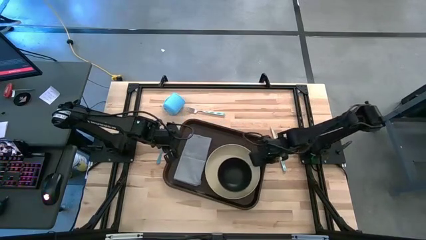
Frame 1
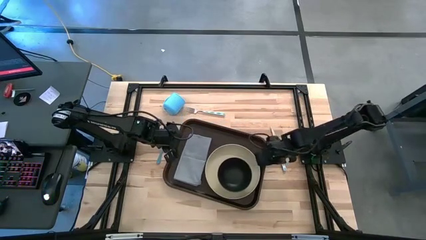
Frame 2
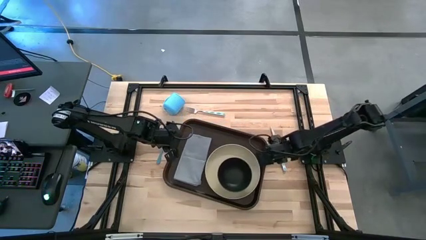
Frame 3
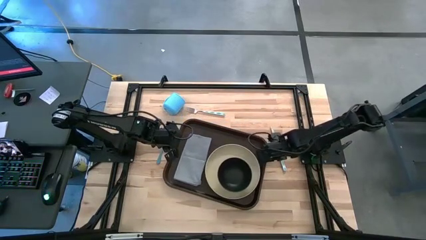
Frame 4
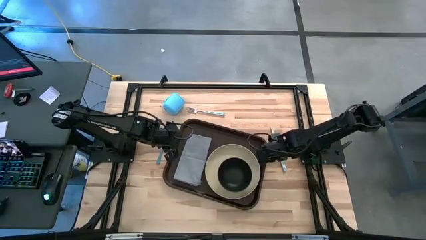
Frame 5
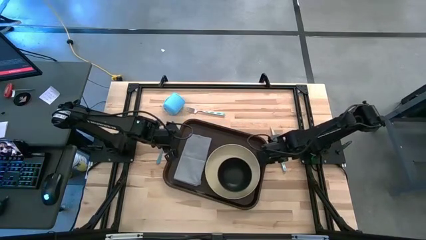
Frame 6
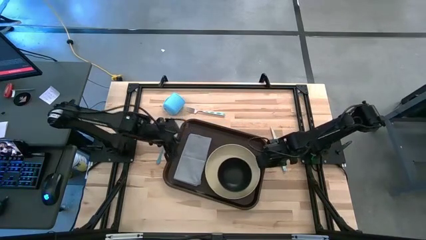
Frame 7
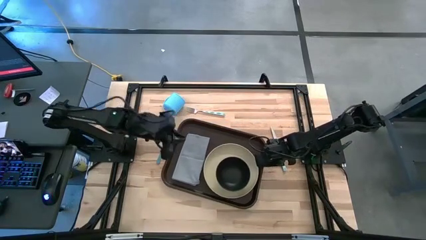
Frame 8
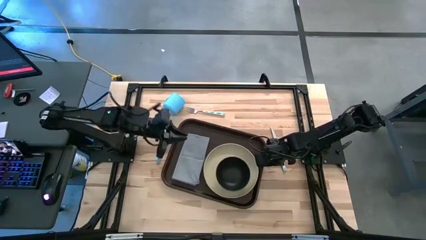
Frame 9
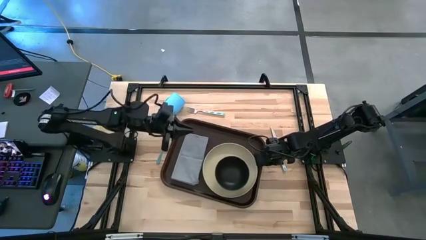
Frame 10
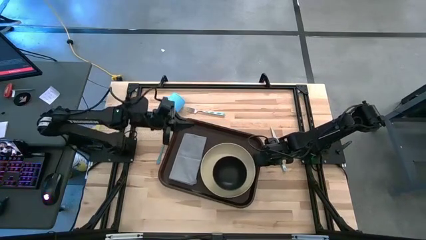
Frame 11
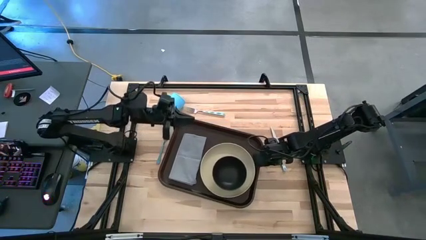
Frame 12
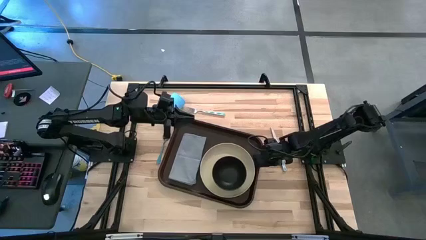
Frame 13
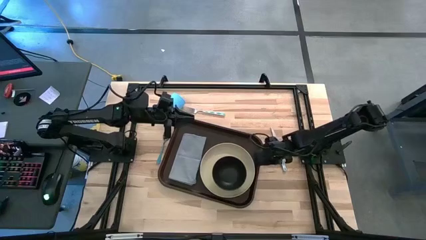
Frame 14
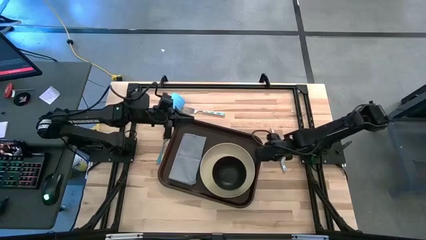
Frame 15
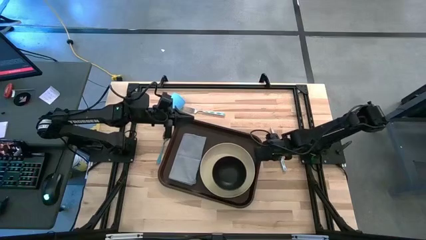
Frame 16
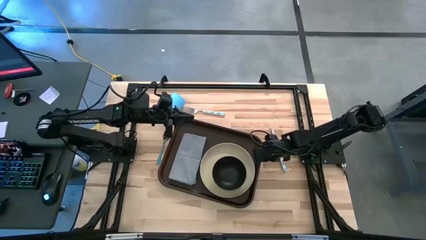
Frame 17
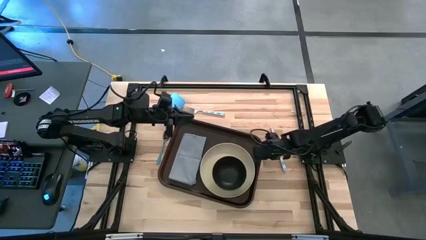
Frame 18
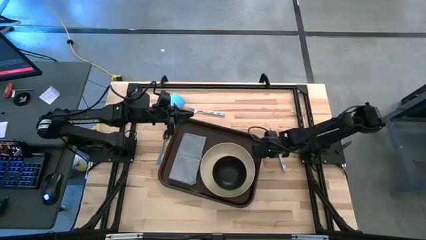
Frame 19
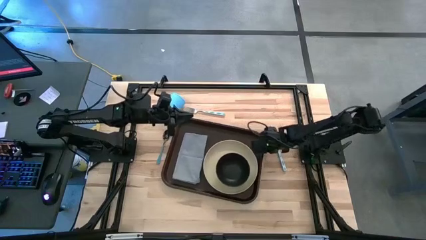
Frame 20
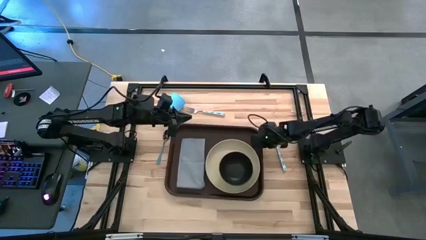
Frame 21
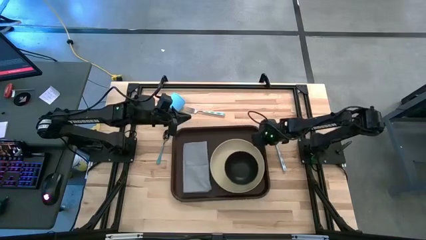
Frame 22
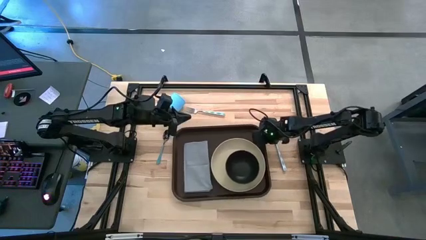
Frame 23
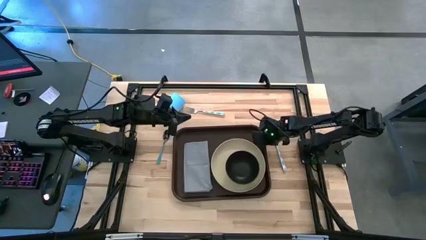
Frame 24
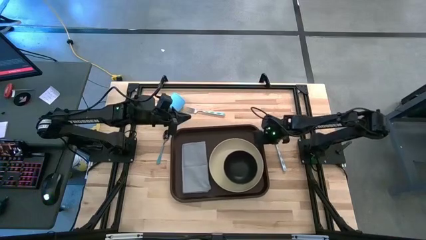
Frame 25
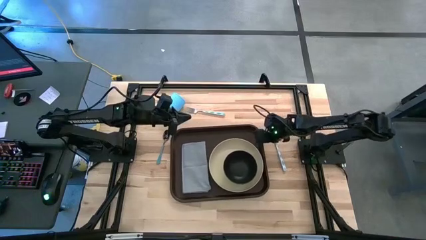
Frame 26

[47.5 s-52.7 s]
Task: Set up tray
Adjust the dark brown serving tray

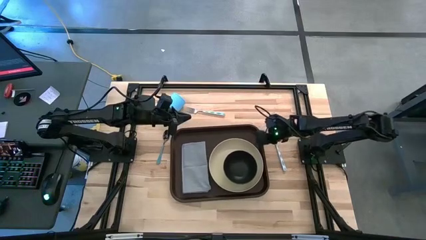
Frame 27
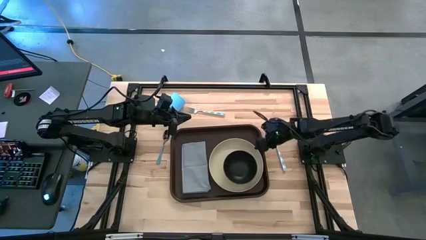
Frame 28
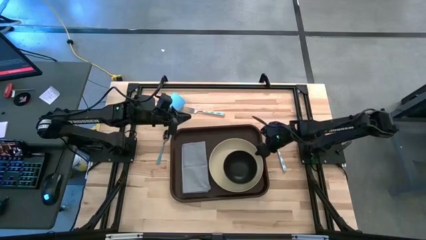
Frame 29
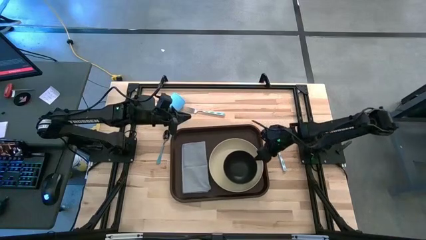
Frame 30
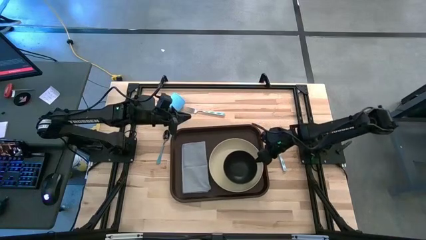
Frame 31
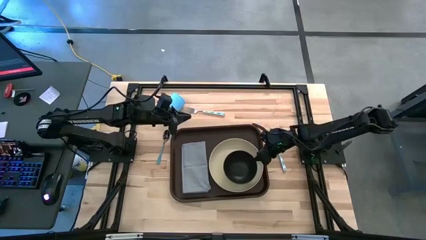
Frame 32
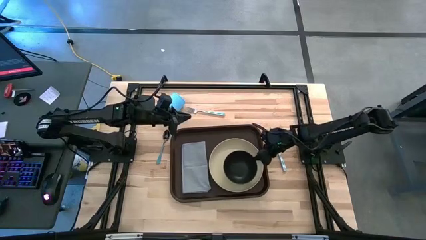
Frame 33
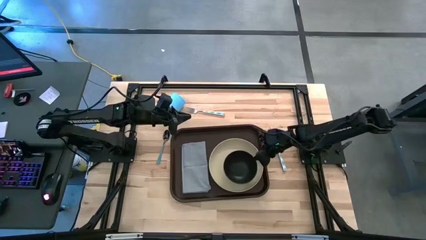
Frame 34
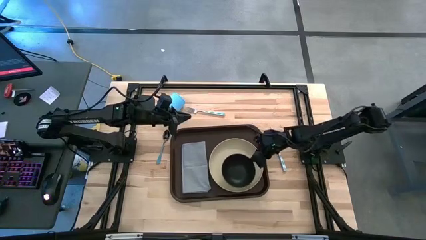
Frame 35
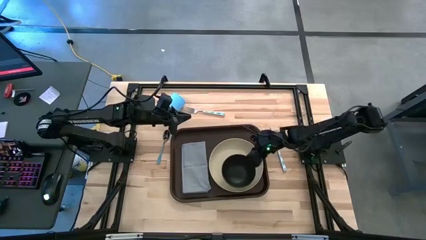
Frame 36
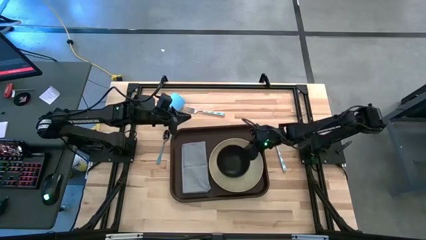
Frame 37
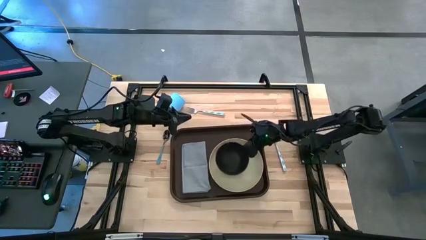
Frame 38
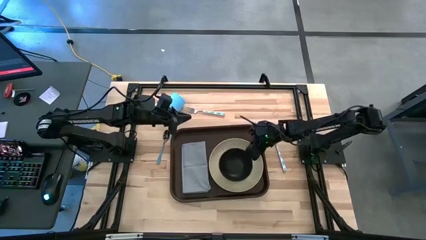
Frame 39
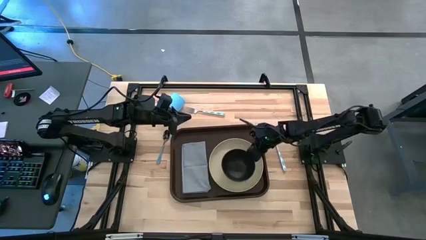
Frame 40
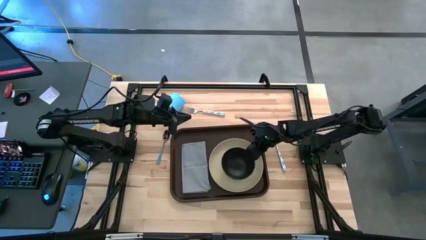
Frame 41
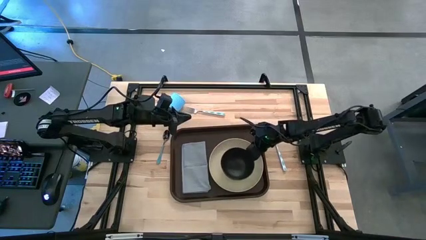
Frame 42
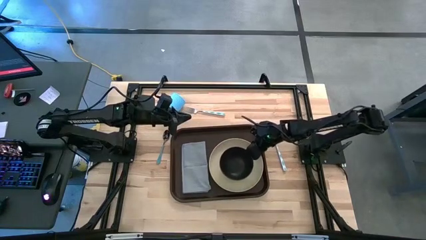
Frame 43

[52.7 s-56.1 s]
Adjust the black bowl

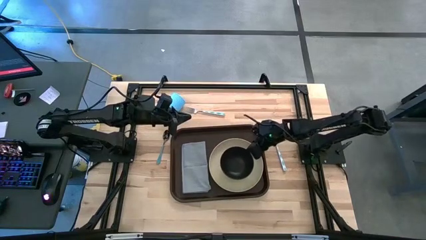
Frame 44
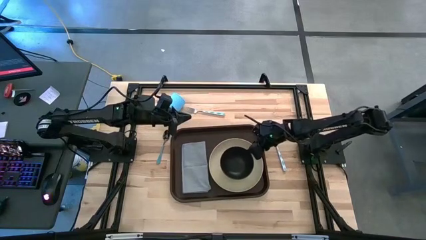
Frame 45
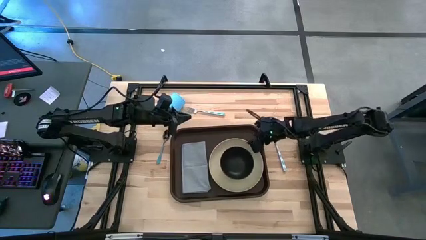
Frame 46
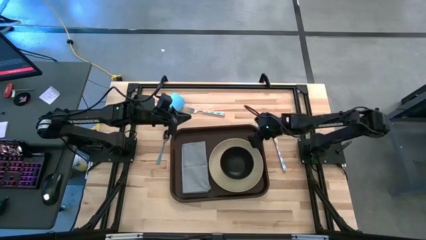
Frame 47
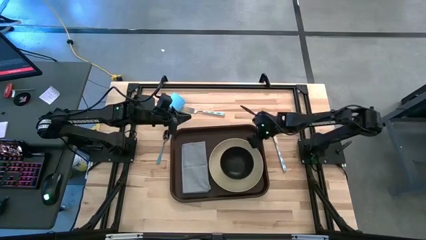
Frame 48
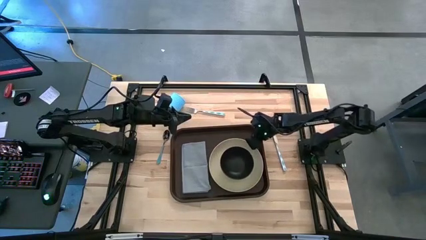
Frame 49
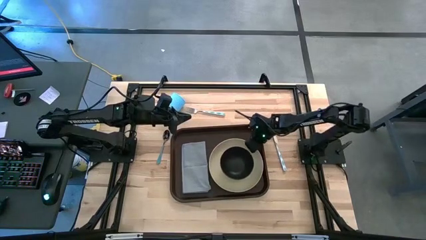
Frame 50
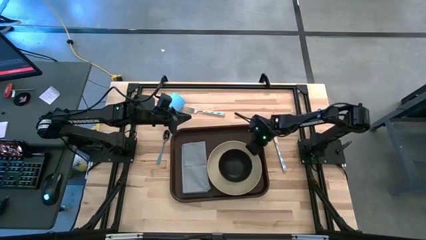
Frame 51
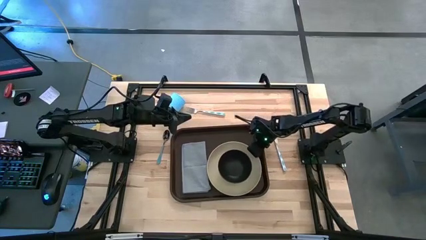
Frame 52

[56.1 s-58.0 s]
Adjust the brown plate

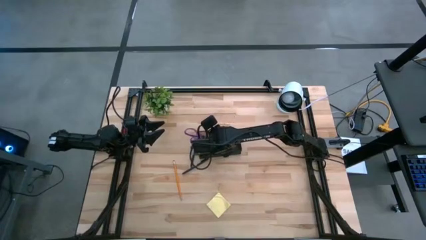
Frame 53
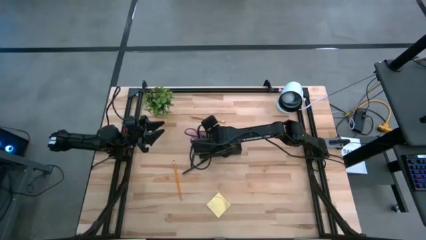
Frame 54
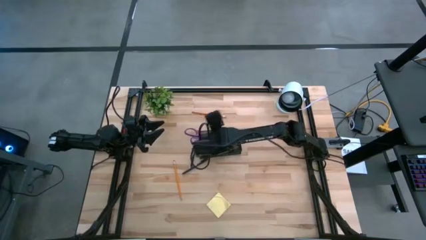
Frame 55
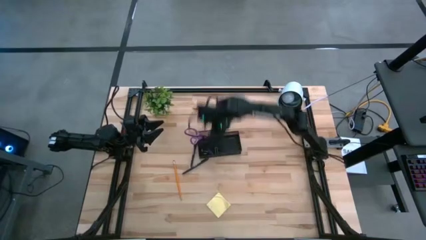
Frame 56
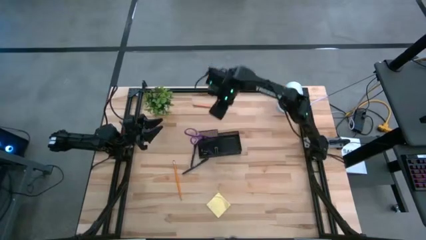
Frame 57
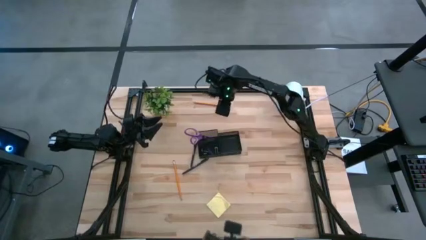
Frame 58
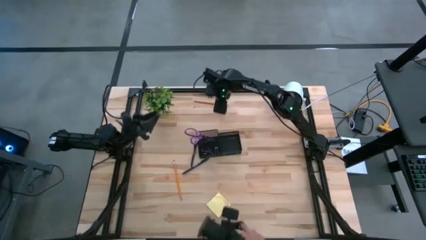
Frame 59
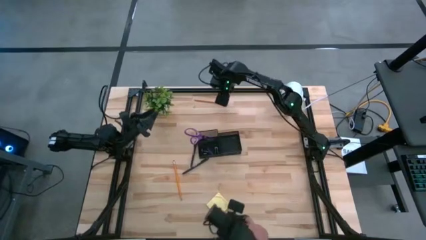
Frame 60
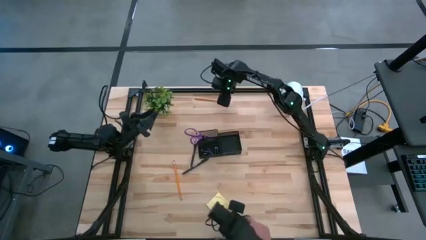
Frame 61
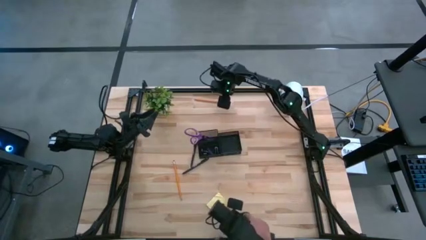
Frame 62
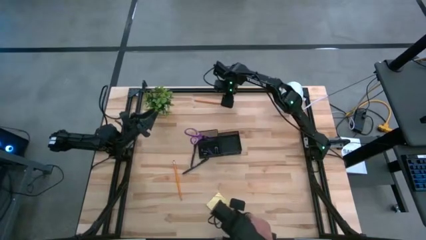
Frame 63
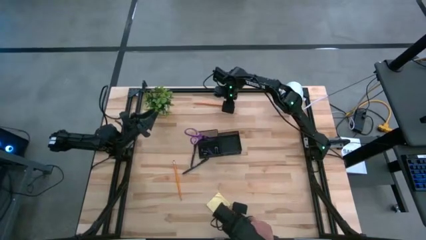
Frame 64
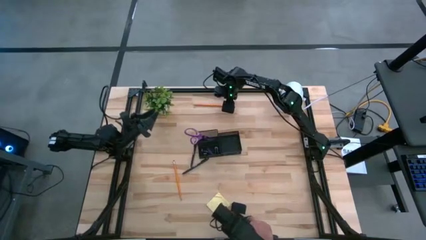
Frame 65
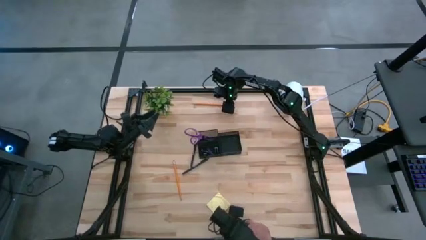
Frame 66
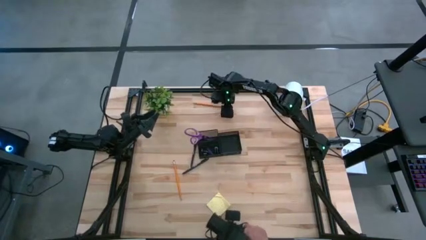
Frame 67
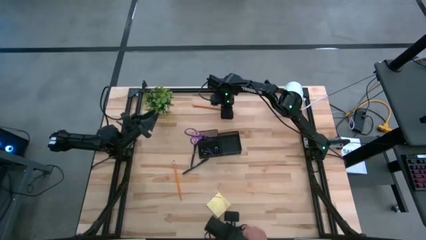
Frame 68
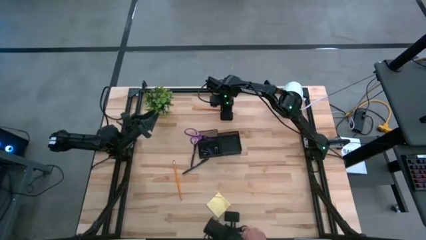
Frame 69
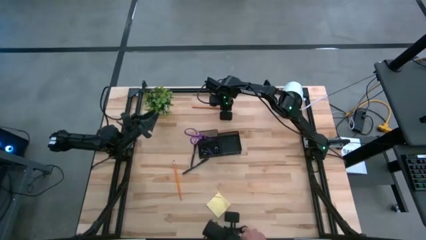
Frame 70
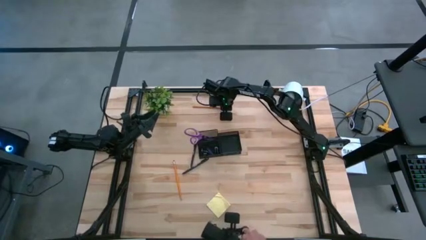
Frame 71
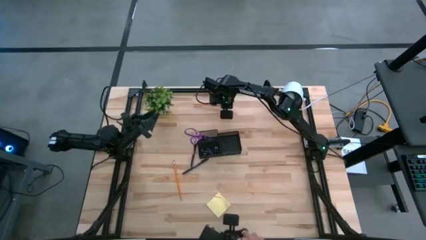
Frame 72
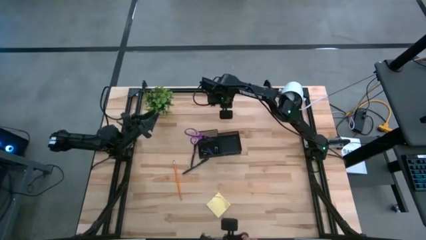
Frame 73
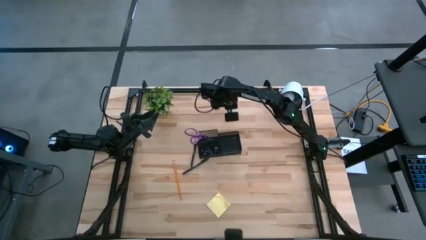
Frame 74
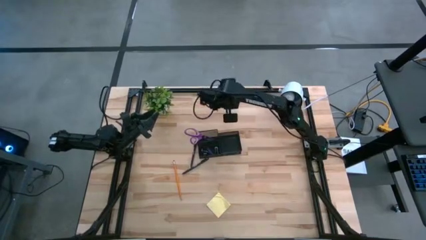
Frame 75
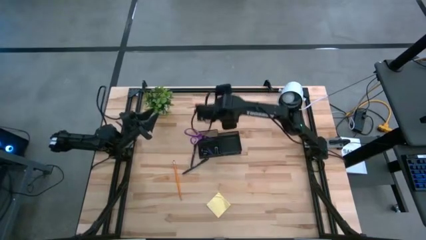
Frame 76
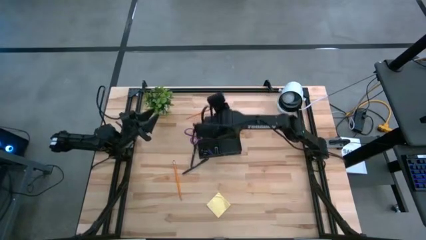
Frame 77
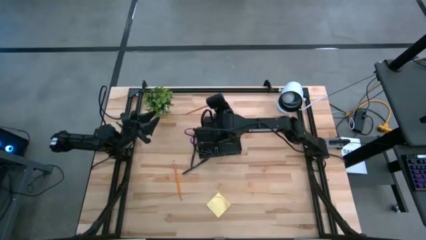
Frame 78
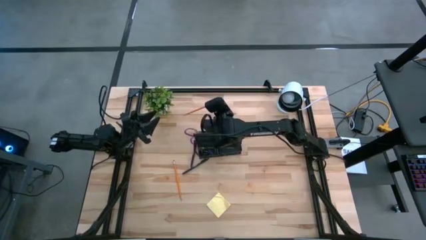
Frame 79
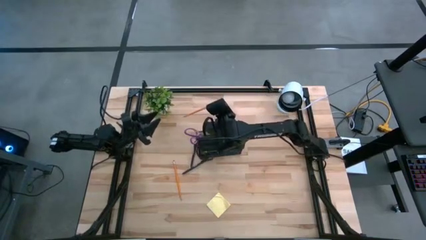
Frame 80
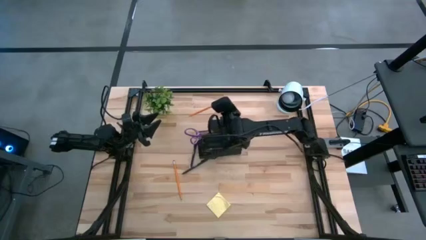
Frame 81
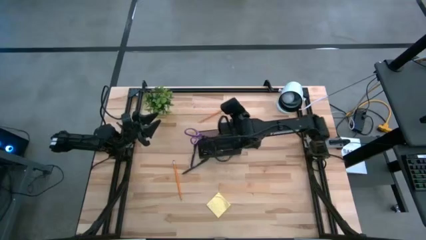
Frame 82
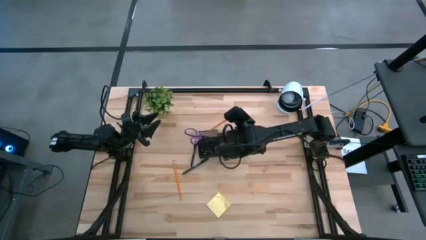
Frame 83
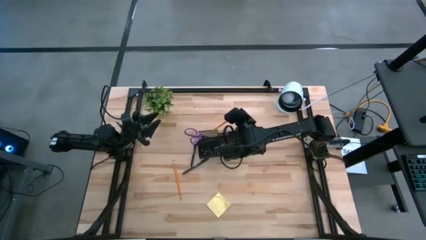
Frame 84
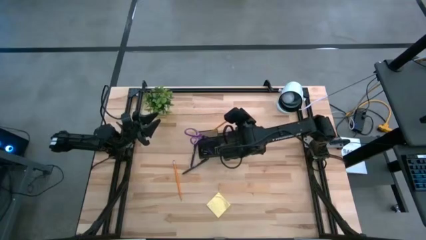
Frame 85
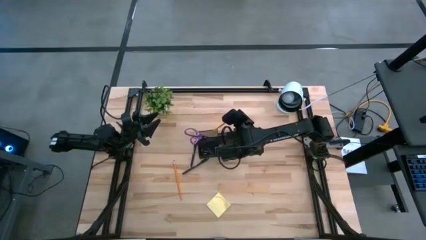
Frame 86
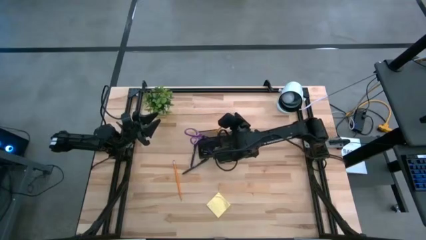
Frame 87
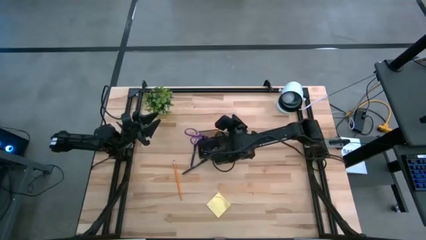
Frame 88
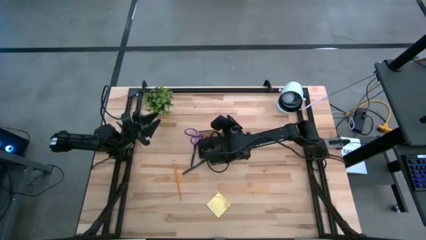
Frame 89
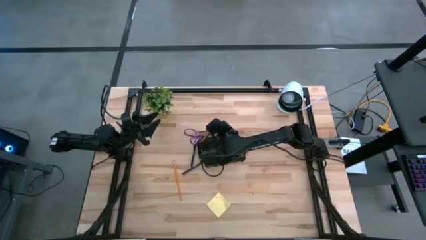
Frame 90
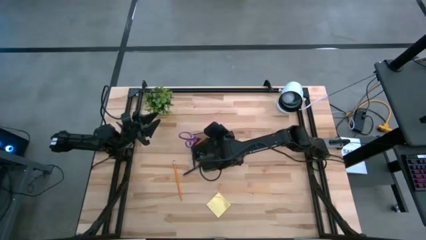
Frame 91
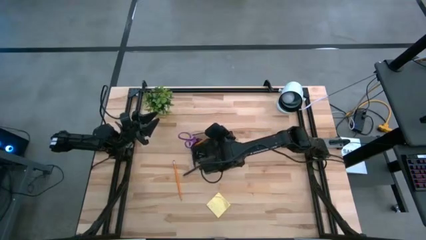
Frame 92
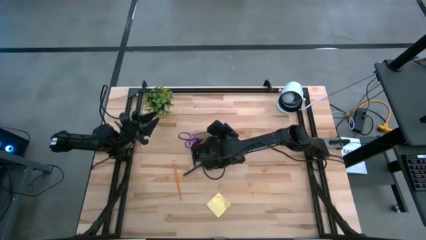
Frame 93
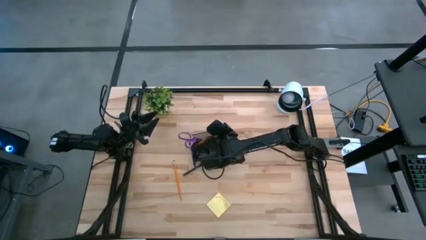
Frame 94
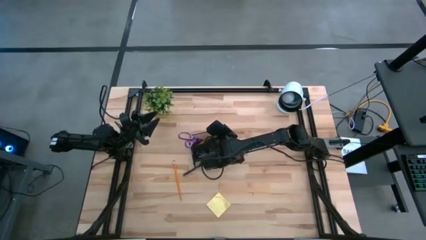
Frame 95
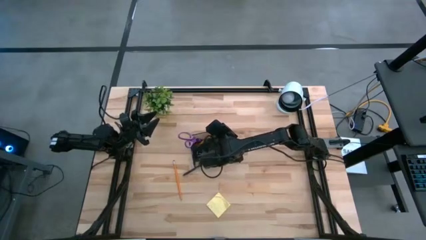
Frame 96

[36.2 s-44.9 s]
Task: Pick and place office supplies into organizer
Put the right orange pencil into the black desk organizer
